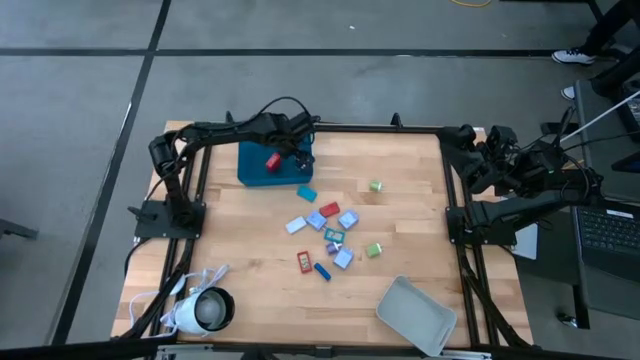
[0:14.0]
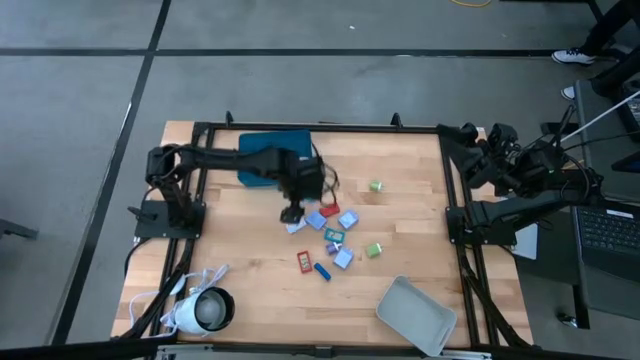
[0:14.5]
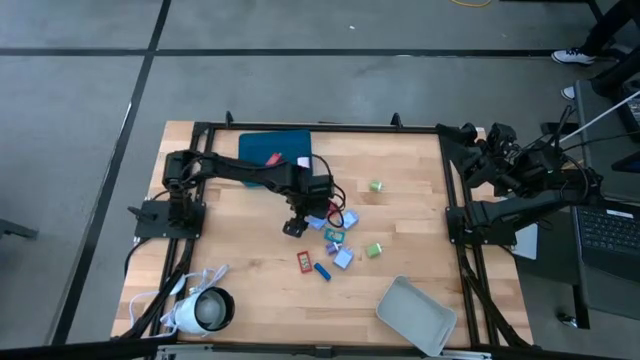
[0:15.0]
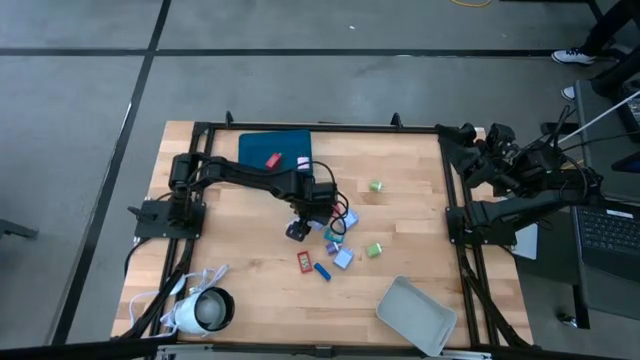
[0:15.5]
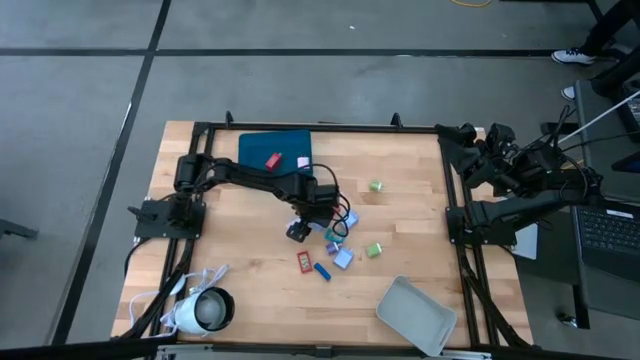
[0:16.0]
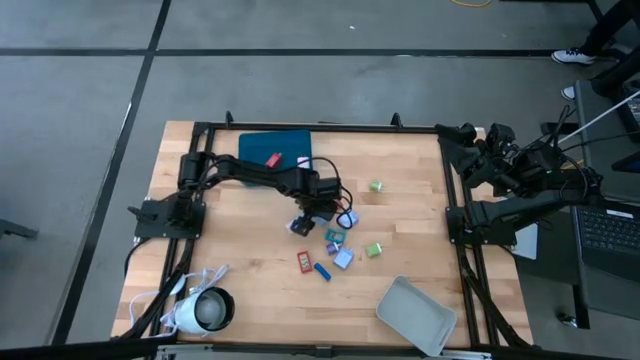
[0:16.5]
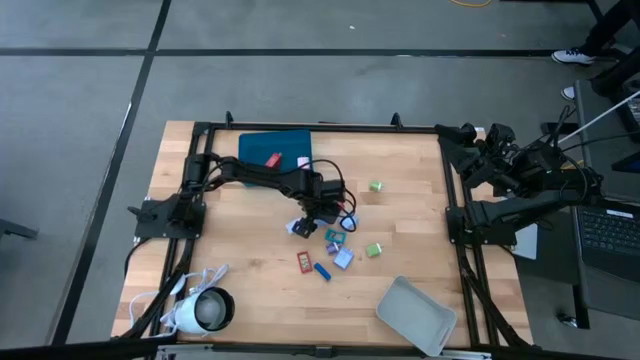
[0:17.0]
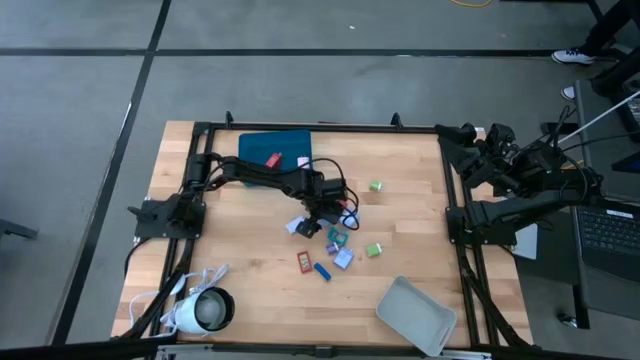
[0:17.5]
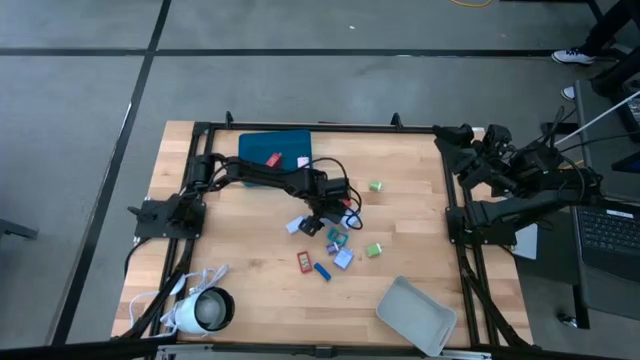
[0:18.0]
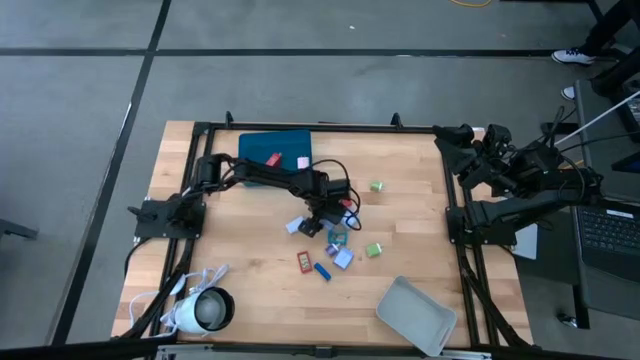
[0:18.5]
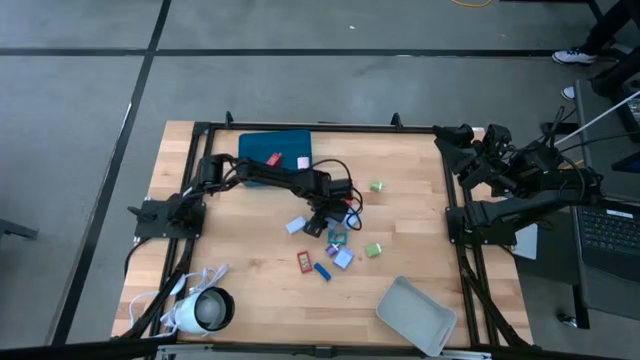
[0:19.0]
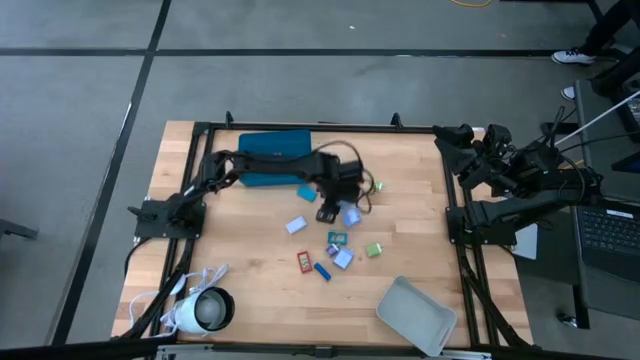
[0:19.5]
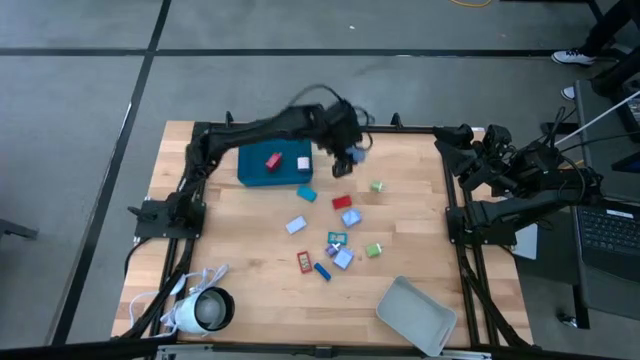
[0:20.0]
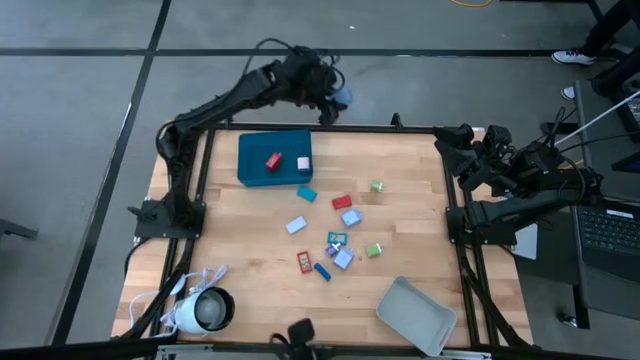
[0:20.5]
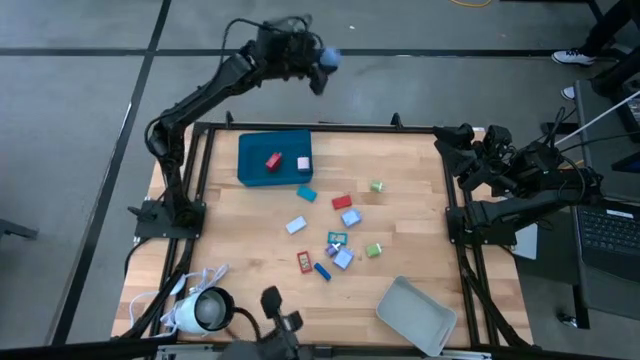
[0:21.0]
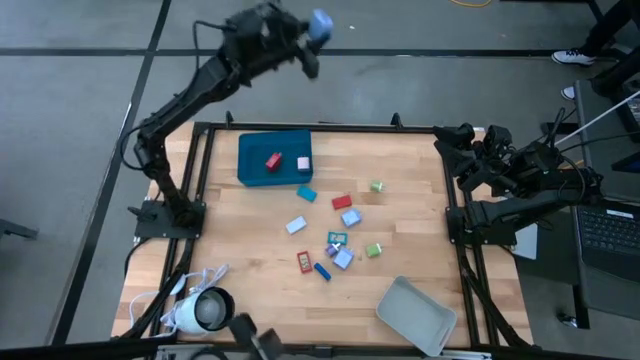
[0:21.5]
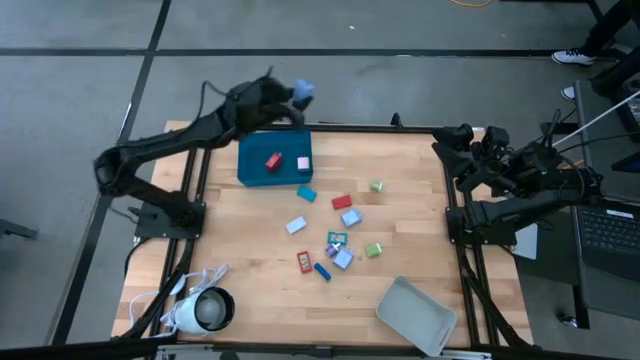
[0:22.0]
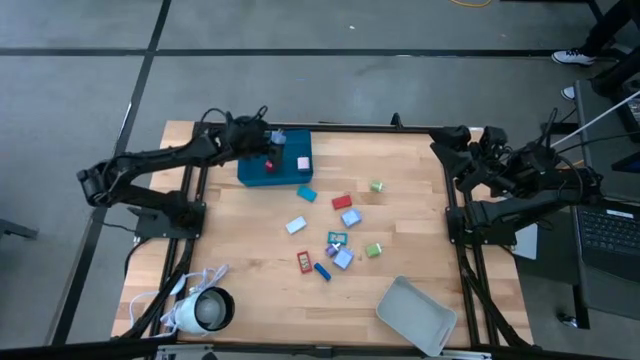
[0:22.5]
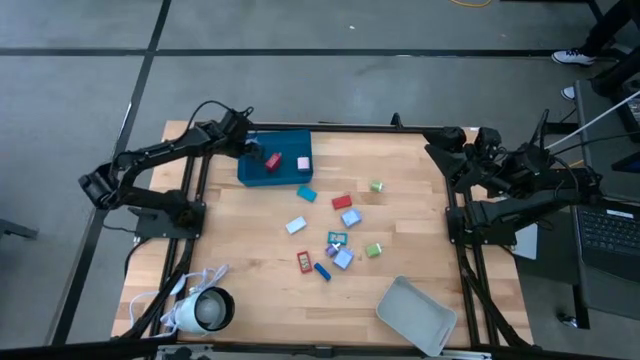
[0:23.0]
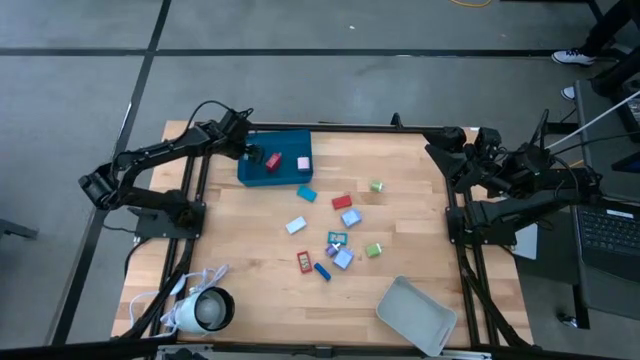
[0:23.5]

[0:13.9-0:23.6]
Task: Pick & Place Office items
Put the left light blue charger adapter into the blue bin

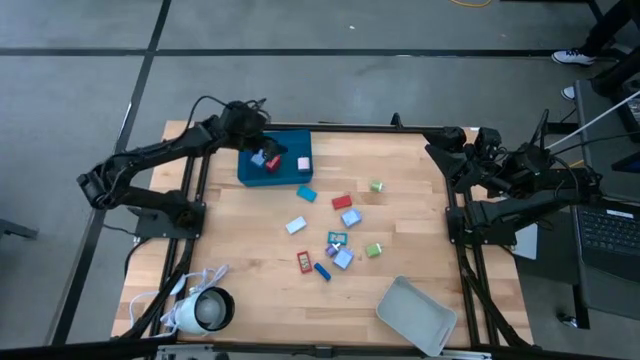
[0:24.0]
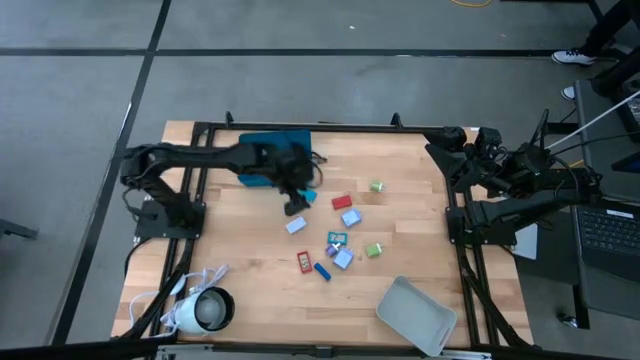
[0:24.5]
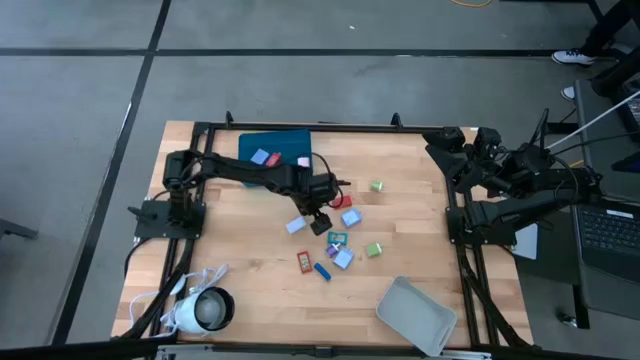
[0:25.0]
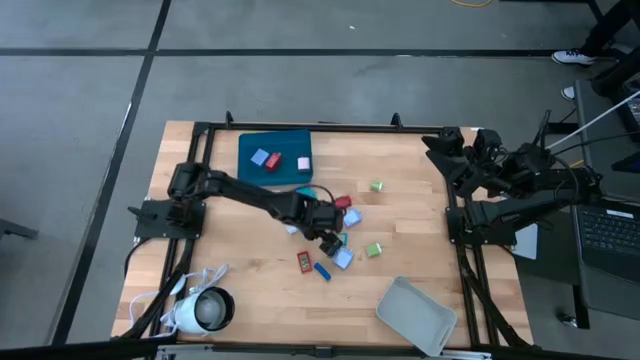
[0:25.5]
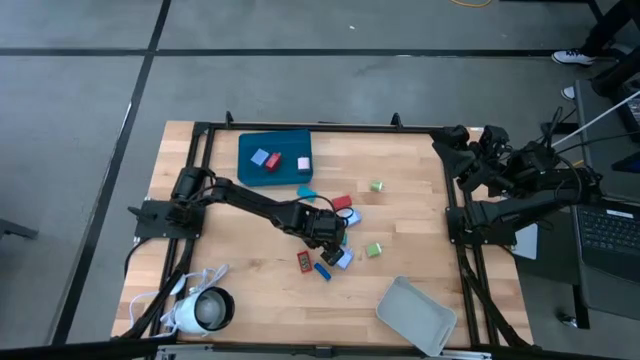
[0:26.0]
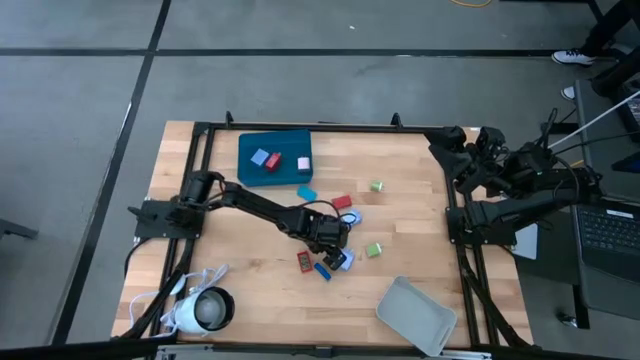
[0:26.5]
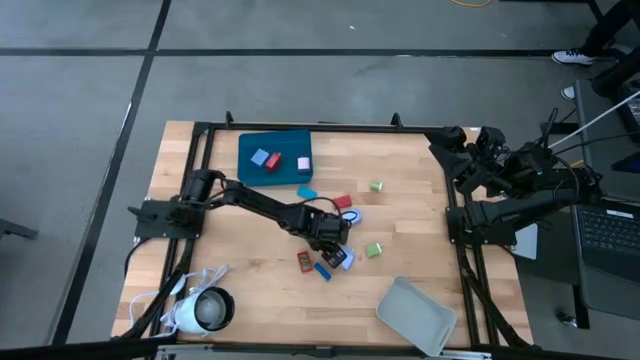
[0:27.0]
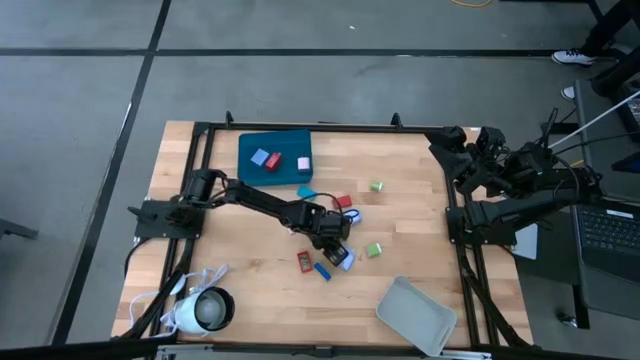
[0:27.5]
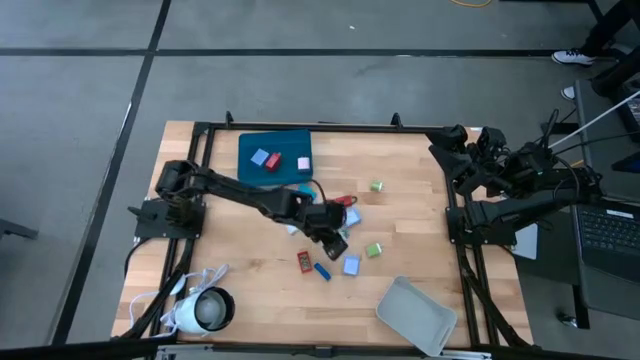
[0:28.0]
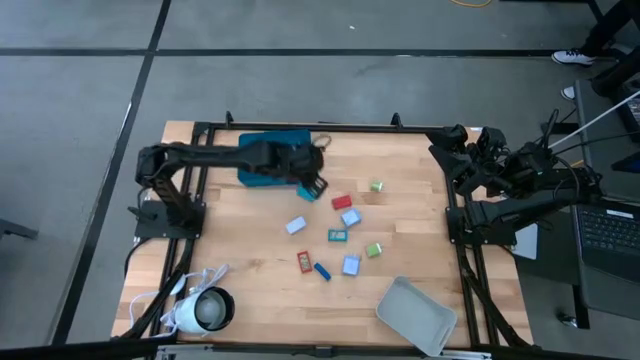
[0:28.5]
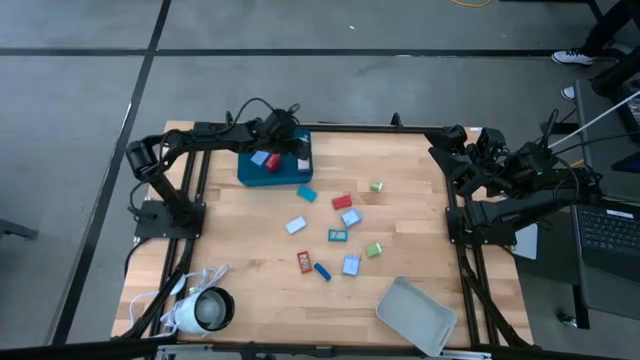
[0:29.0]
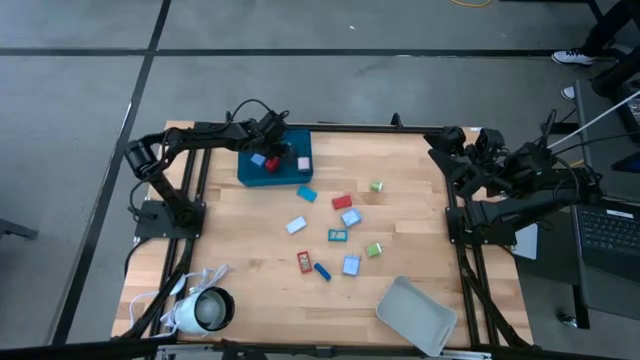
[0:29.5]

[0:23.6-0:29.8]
Put the dark blue charger adapter into the blue bin

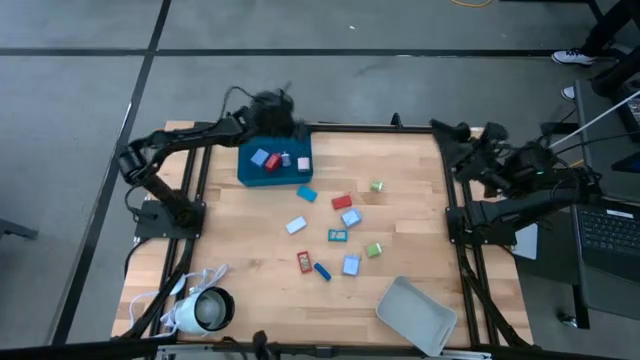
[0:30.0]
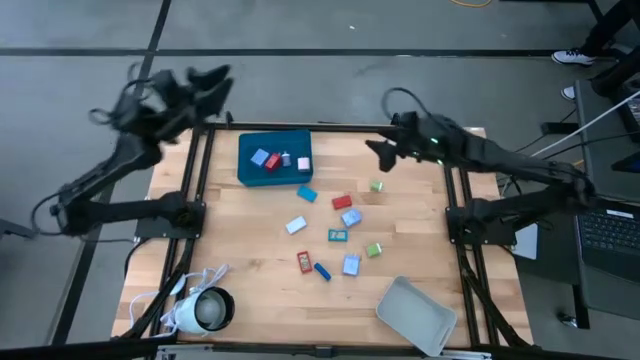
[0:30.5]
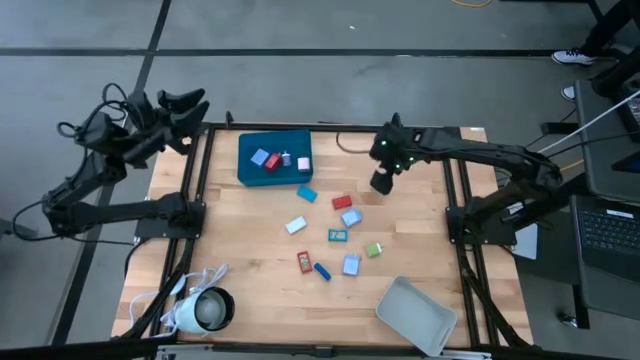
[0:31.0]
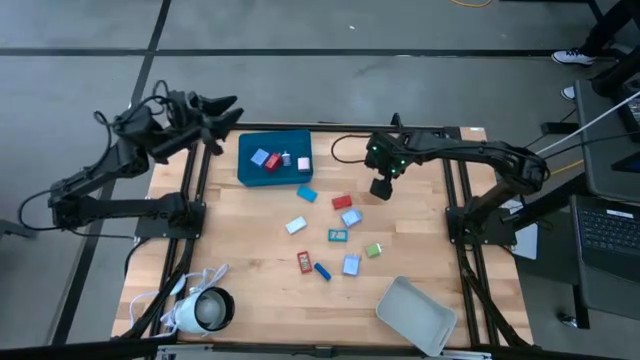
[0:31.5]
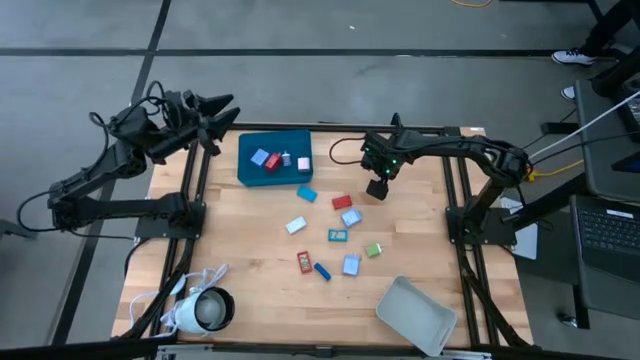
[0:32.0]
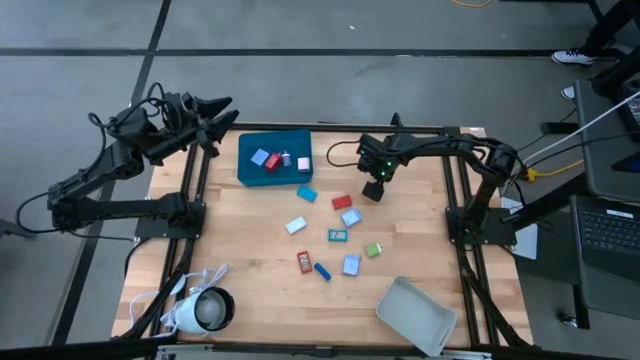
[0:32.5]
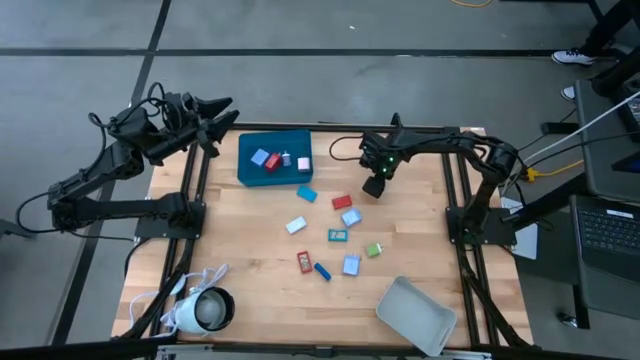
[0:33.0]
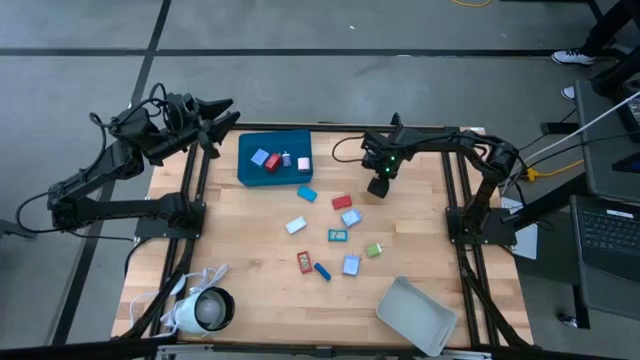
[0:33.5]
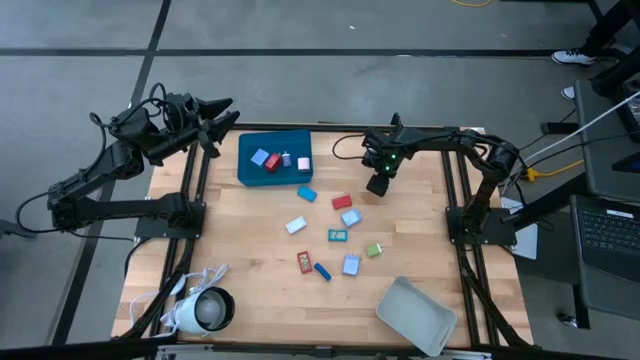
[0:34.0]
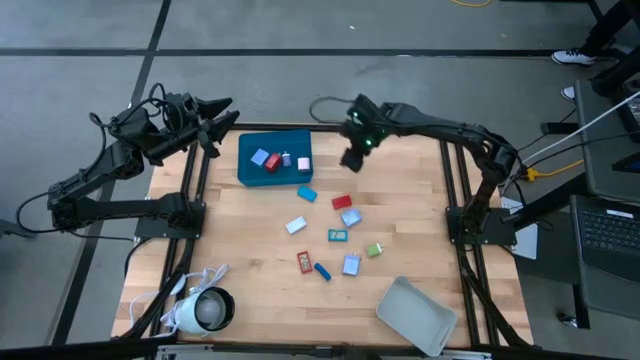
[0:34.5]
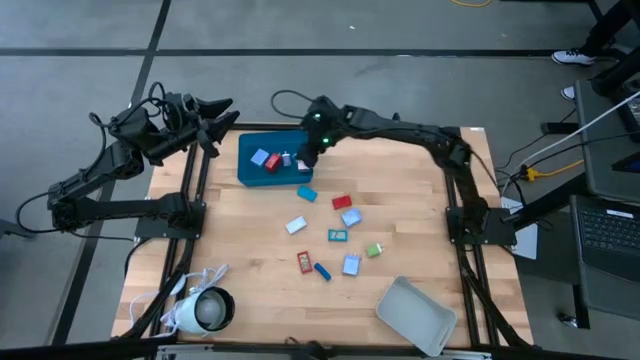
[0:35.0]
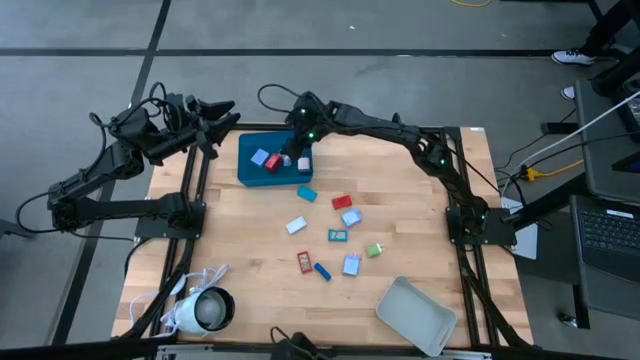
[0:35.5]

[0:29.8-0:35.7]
Put the top green charger adapter into the blue bin
